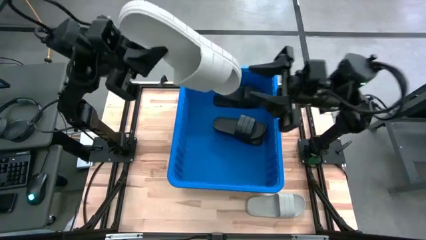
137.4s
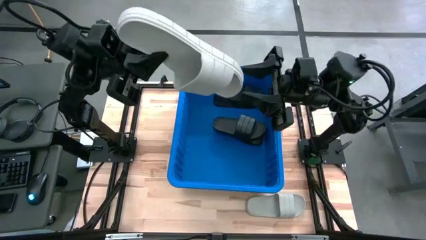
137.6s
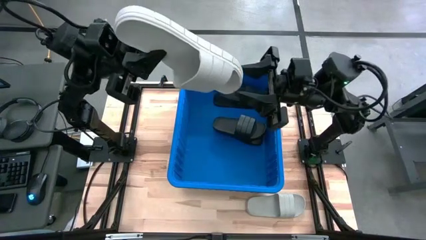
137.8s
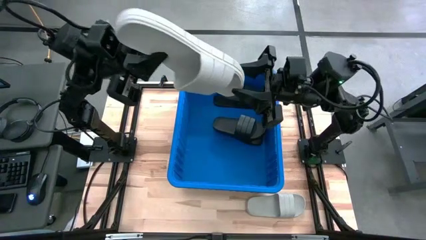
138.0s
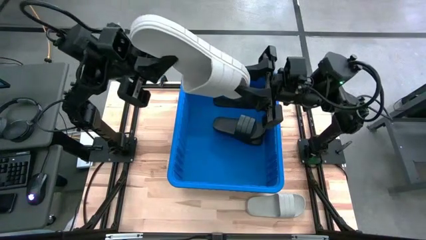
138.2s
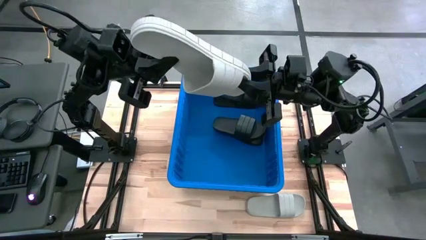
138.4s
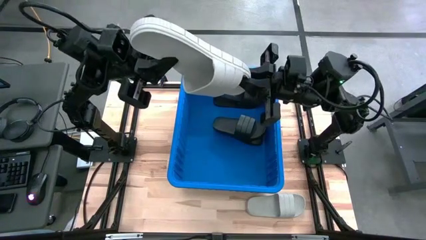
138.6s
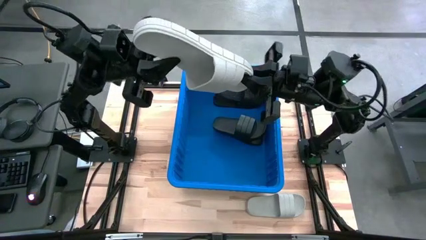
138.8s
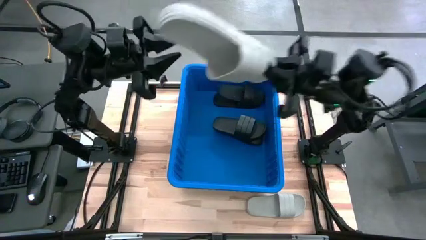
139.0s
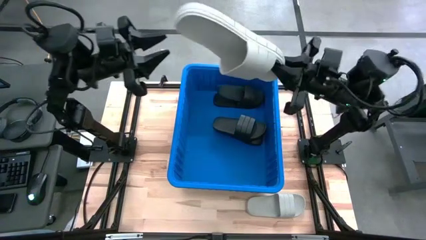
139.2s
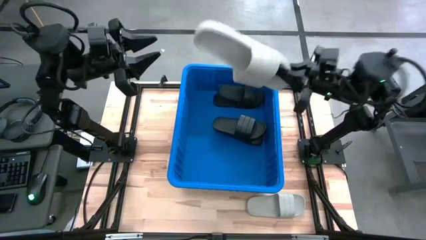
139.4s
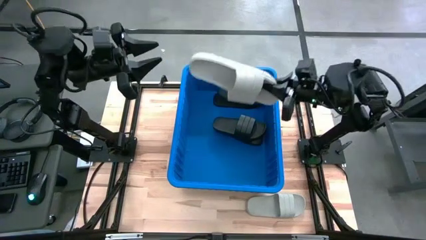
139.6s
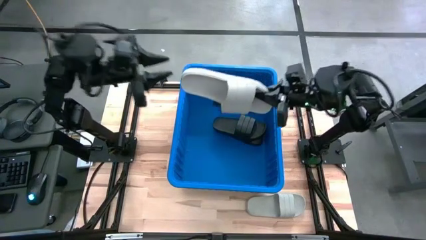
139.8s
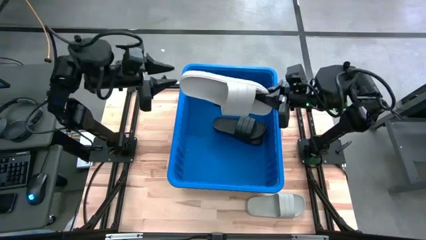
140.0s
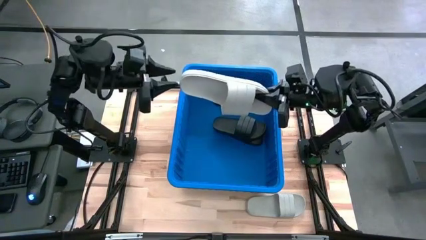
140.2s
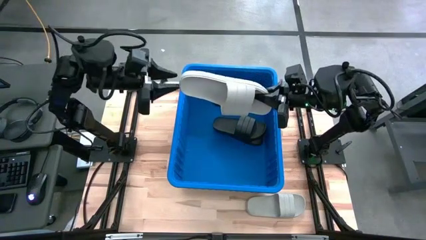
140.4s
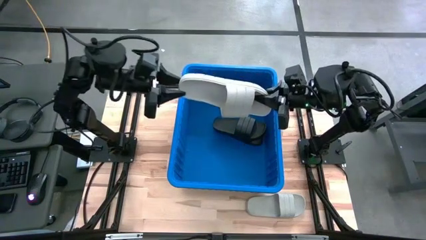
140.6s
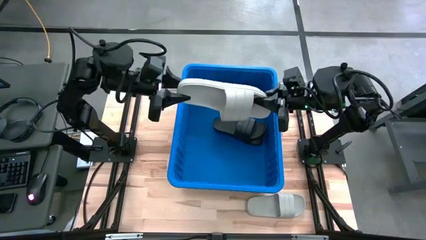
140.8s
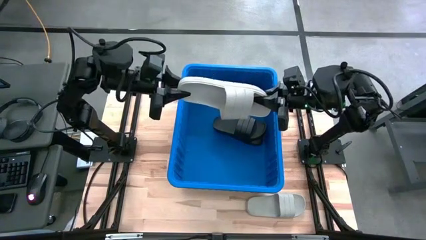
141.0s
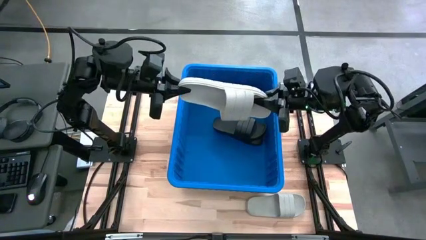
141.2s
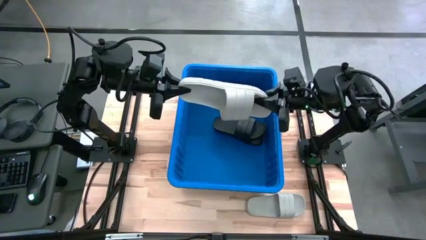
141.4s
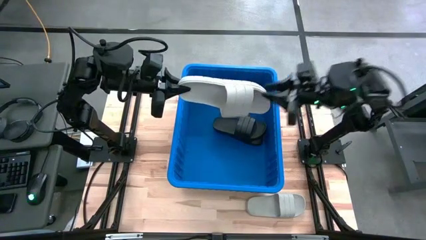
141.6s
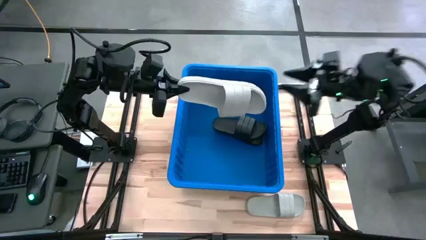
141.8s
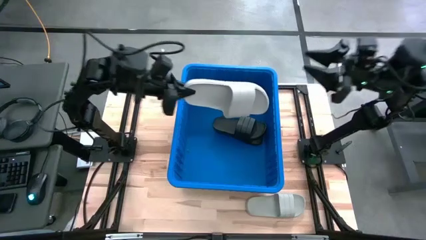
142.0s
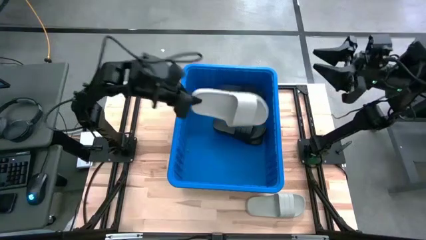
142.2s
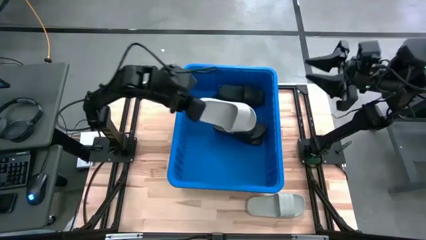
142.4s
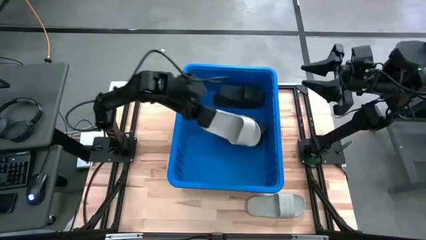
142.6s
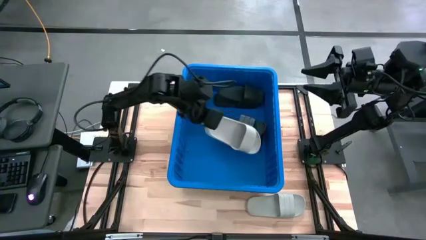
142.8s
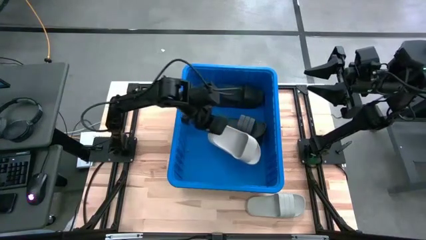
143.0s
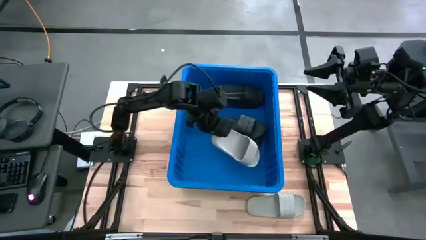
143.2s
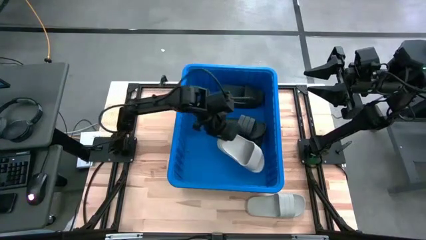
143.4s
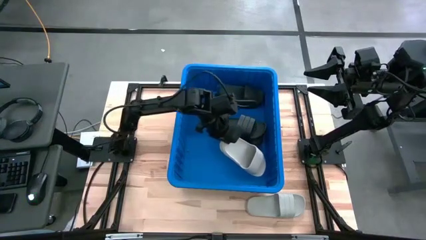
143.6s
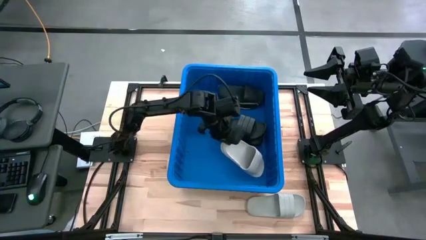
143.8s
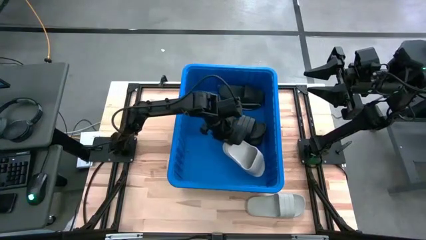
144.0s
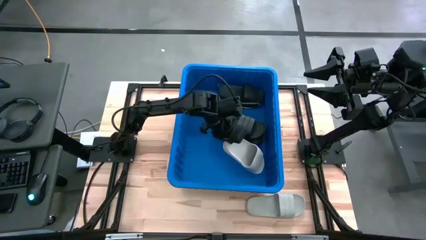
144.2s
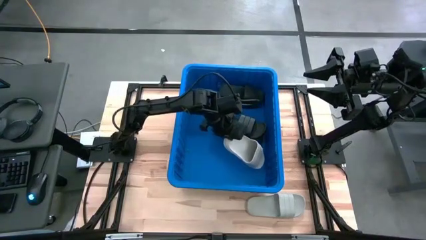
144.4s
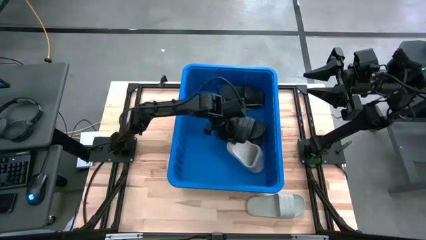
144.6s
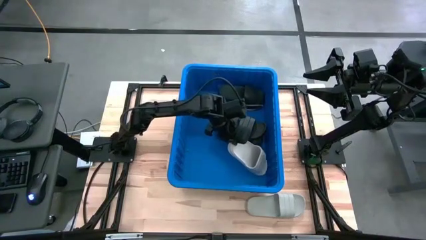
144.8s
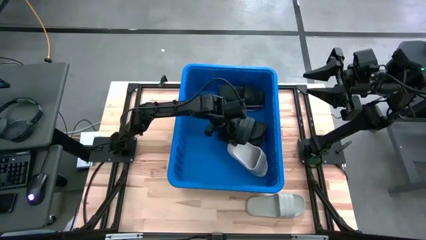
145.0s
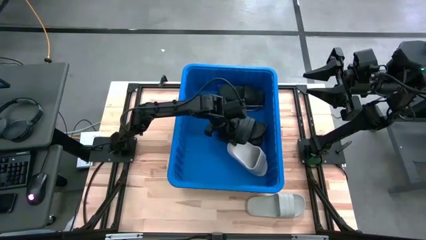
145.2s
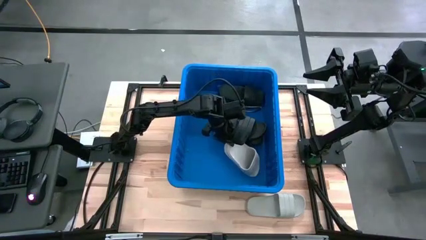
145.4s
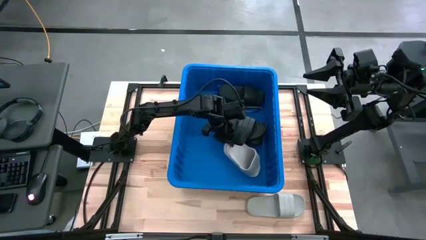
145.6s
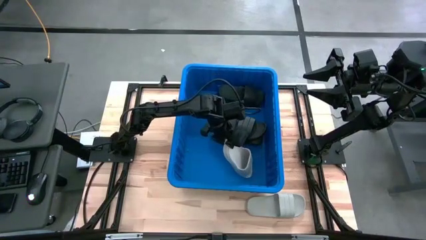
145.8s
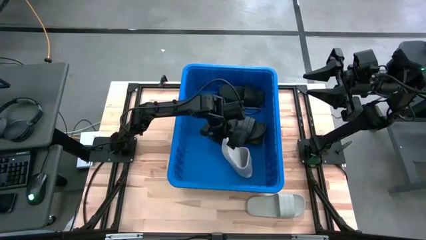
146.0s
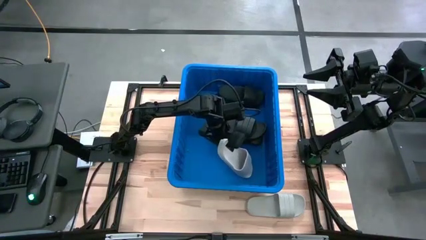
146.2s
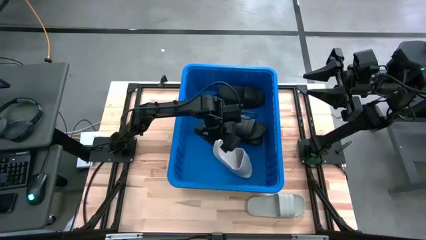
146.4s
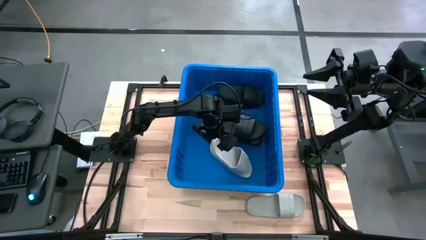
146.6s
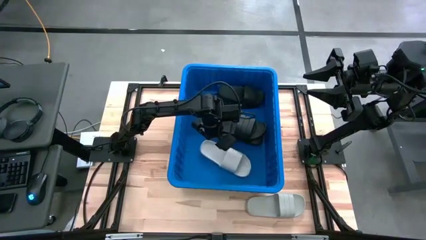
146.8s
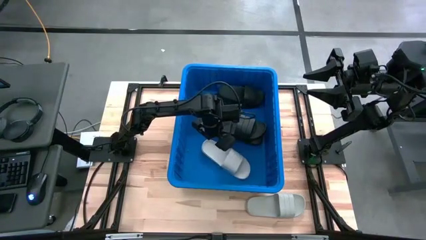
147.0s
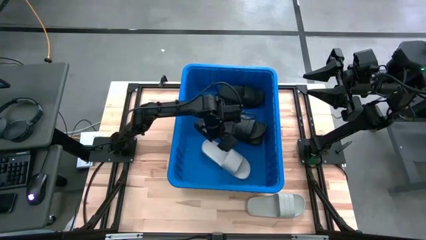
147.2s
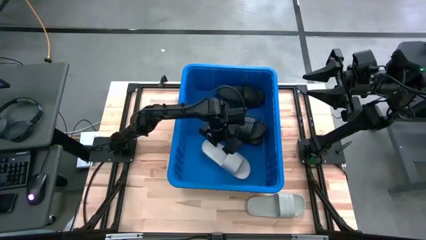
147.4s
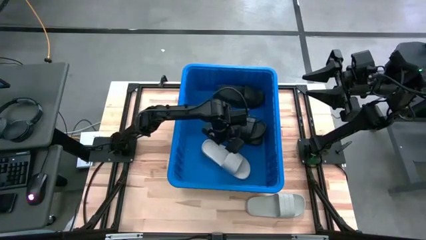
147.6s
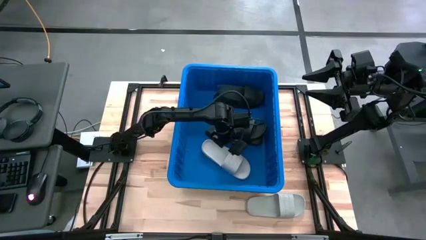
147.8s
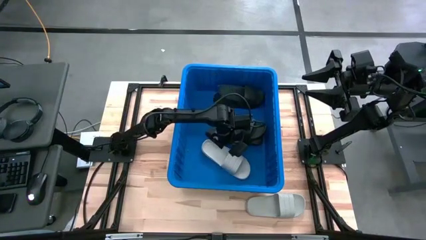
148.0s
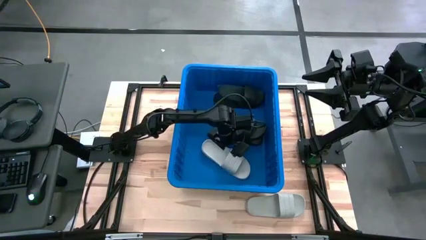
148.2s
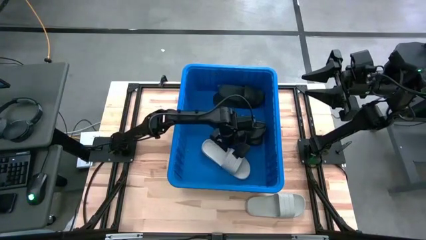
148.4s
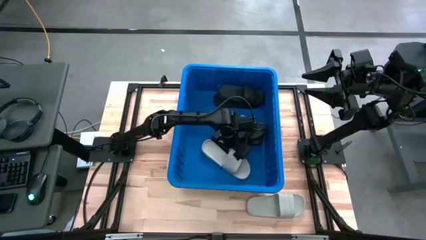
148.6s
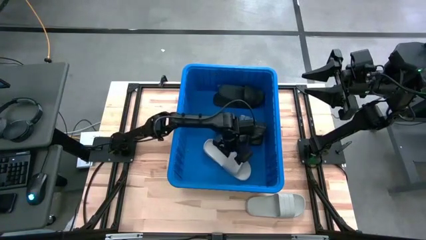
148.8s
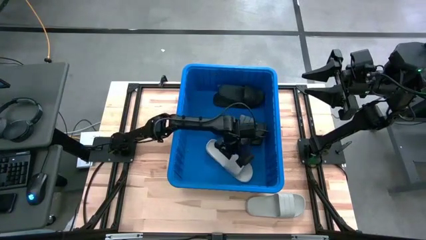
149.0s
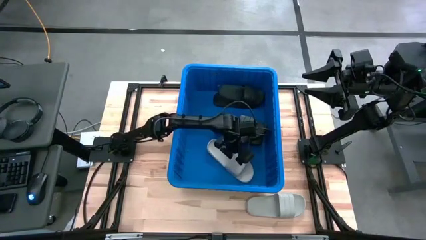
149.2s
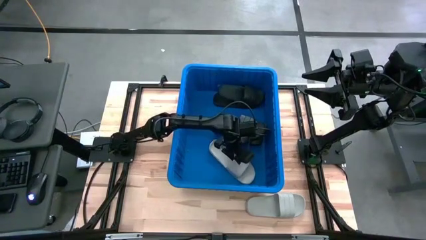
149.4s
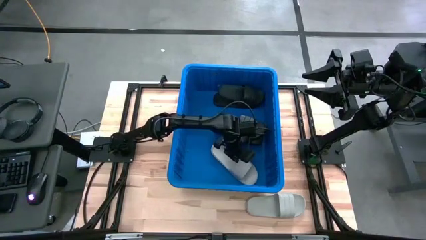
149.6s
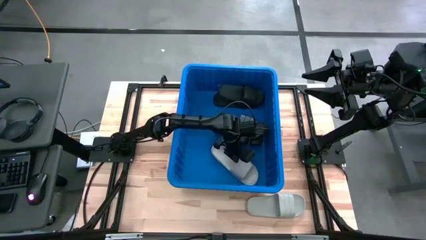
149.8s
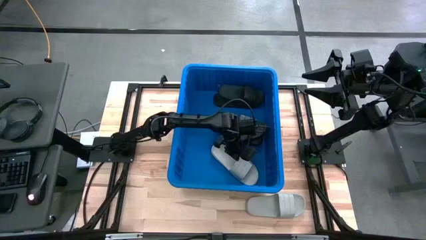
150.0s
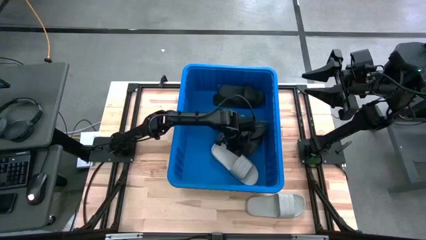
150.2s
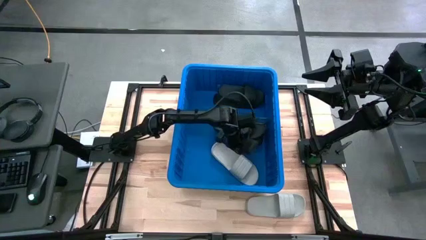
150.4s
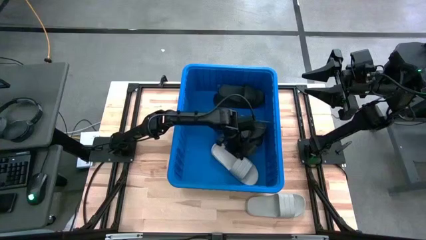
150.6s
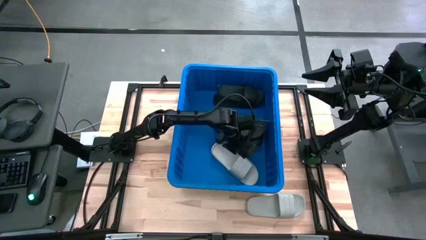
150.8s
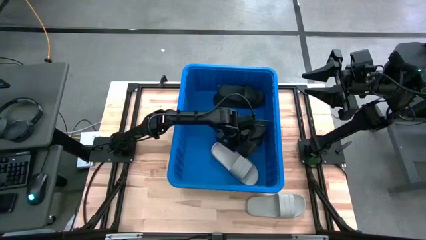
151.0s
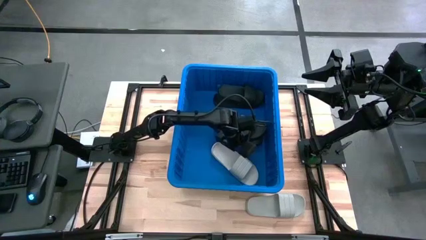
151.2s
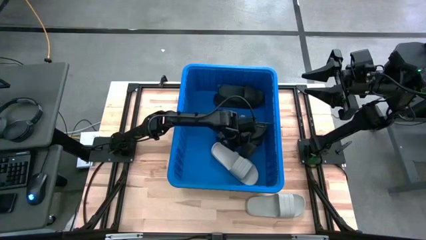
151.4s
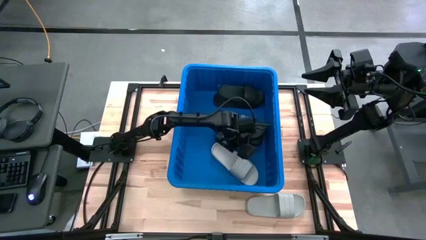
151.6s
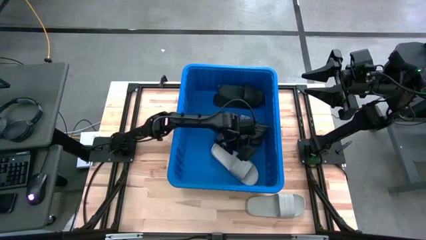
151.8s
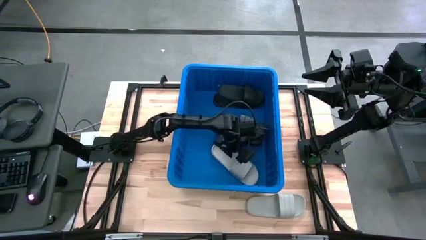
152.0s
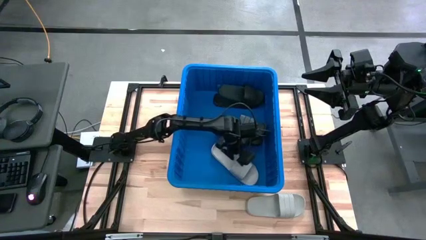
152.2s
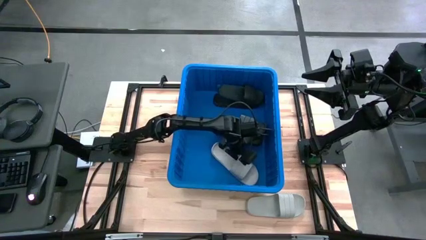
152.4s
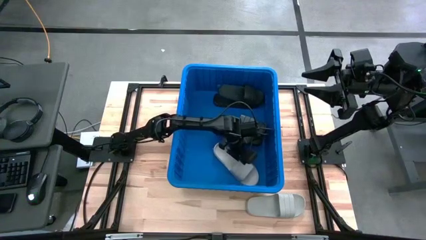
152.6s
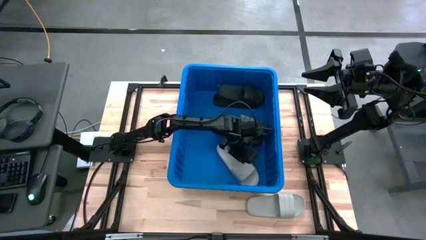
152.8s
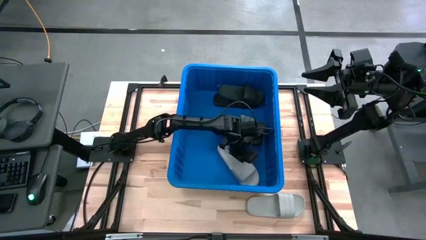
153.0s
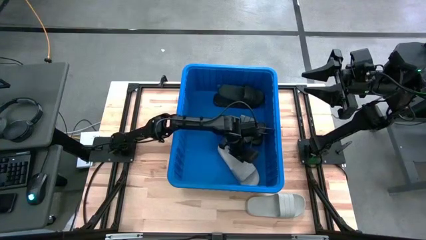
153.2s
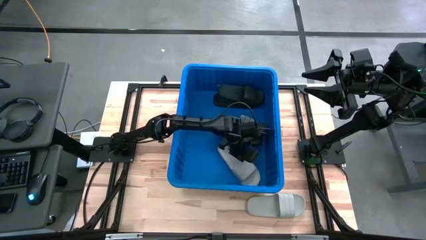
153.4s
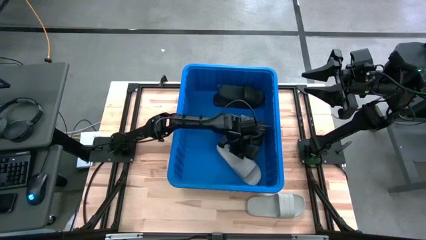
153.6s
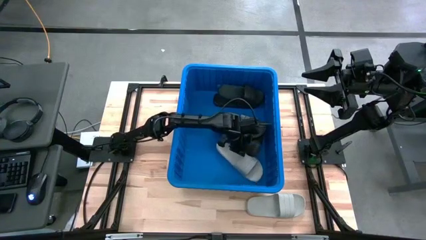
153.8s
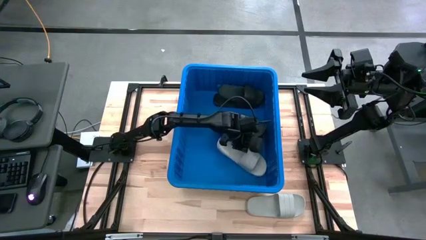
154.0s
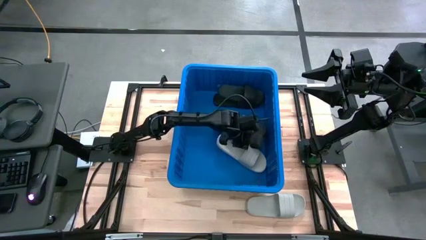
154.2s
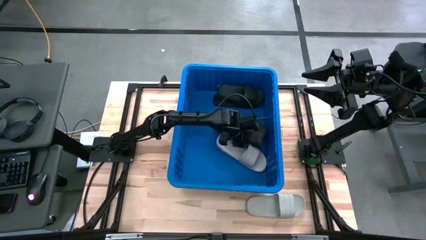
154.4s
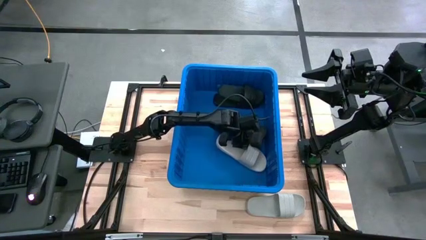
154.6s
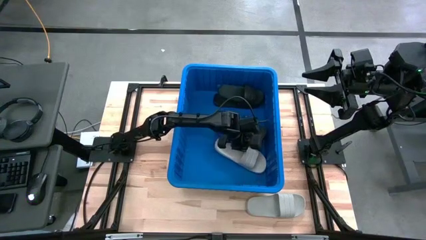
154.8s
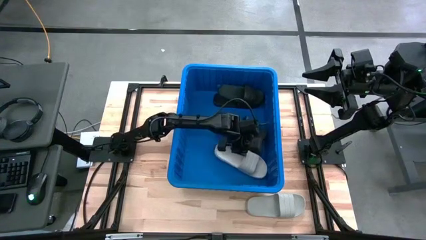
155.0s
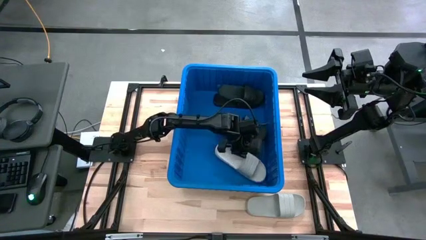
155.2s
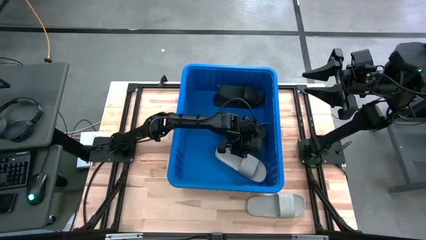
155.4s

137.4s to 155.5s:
Task: Pick and place slides into bin
Put the gray slipper into the blue bin
